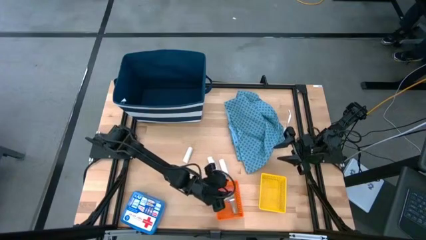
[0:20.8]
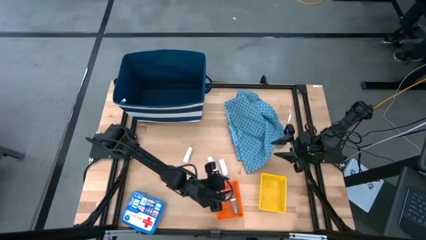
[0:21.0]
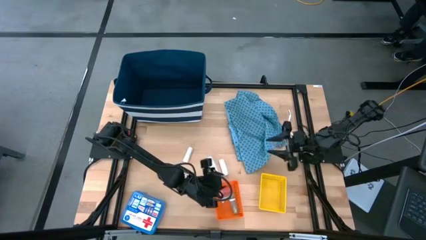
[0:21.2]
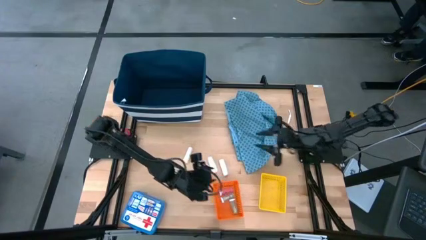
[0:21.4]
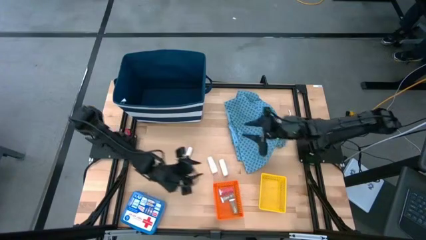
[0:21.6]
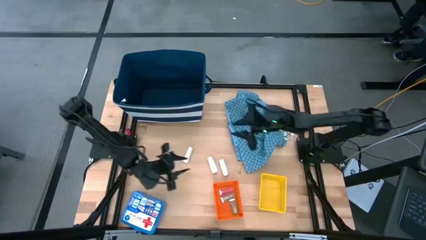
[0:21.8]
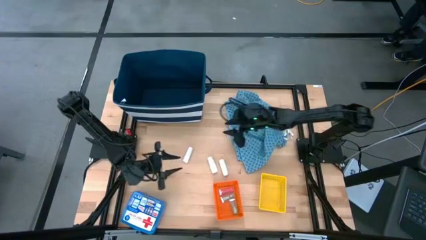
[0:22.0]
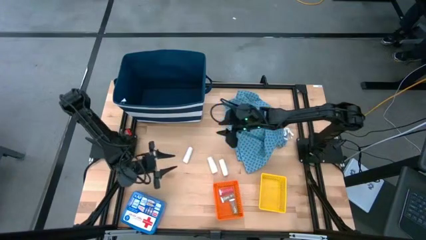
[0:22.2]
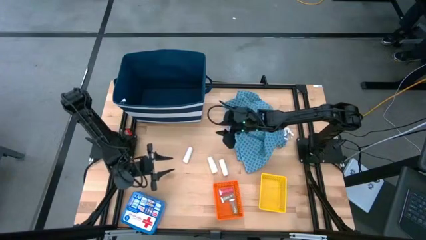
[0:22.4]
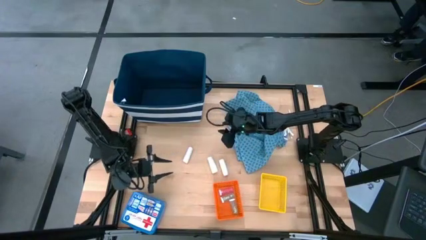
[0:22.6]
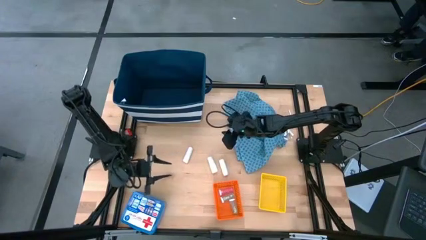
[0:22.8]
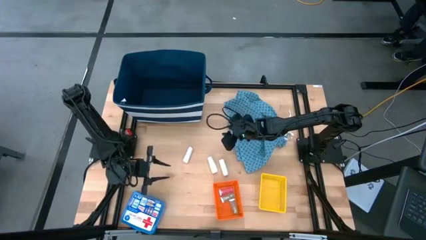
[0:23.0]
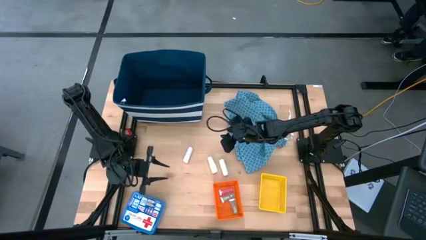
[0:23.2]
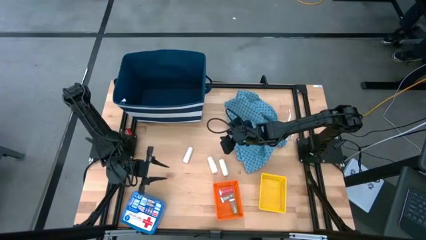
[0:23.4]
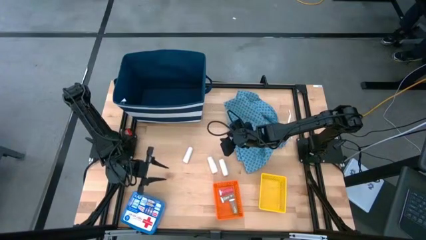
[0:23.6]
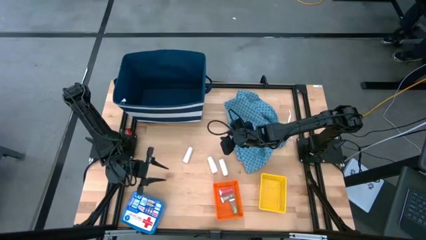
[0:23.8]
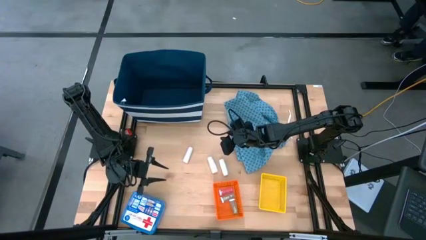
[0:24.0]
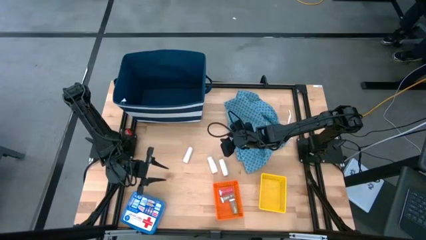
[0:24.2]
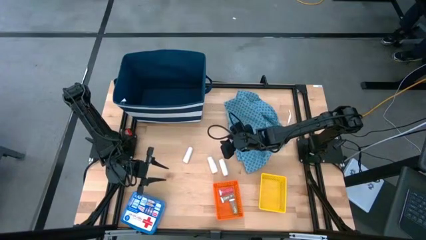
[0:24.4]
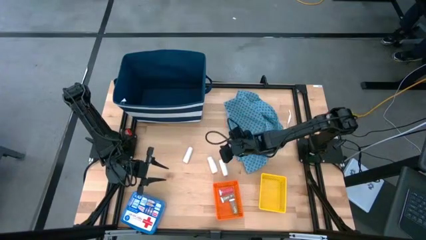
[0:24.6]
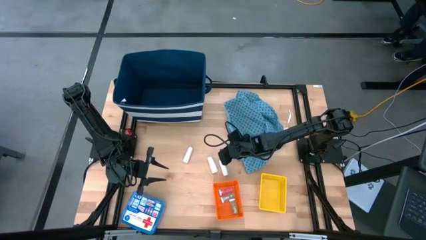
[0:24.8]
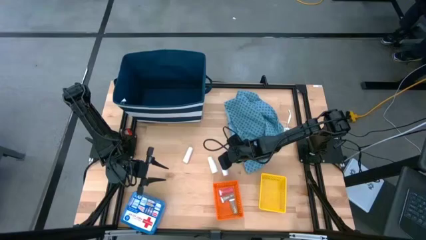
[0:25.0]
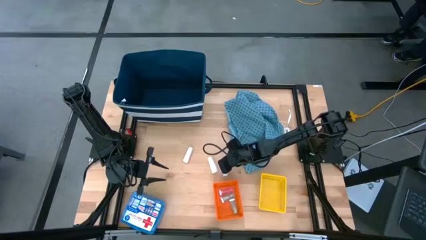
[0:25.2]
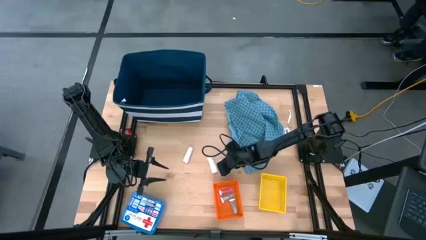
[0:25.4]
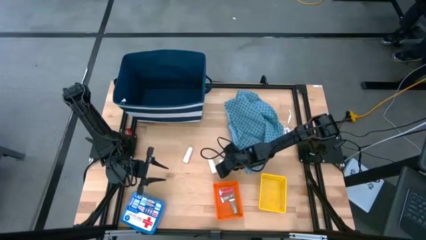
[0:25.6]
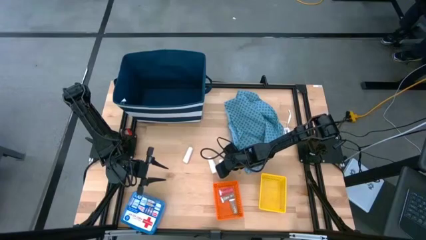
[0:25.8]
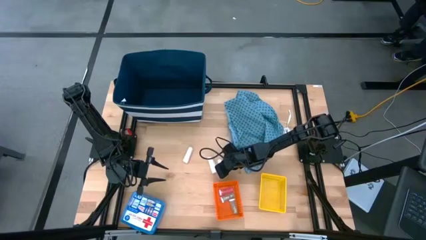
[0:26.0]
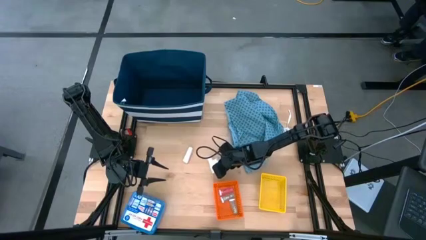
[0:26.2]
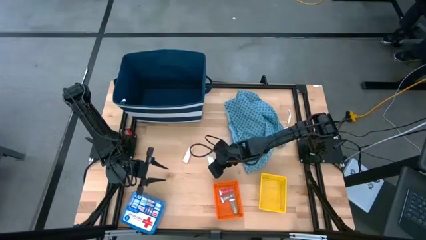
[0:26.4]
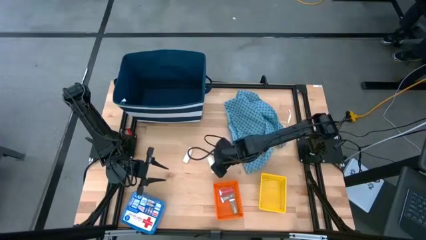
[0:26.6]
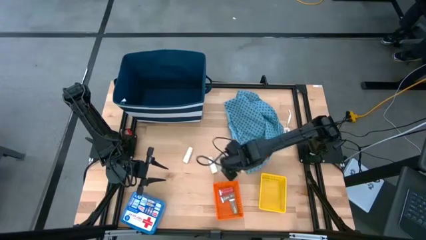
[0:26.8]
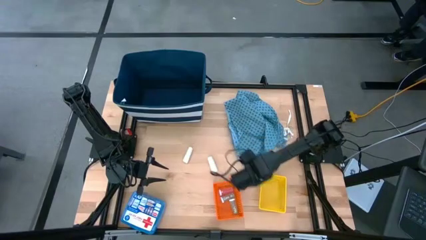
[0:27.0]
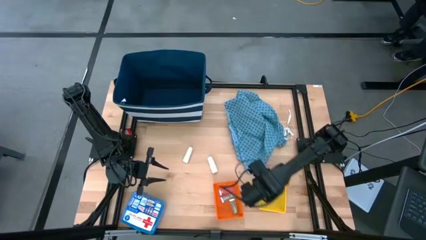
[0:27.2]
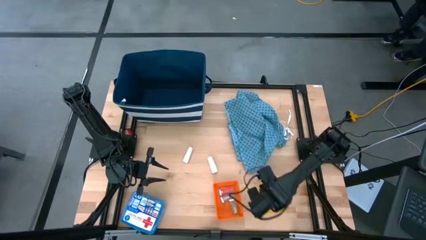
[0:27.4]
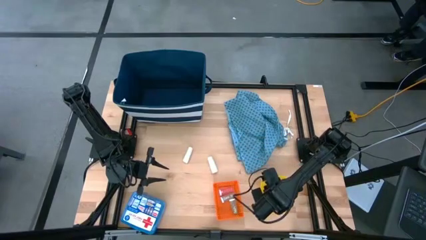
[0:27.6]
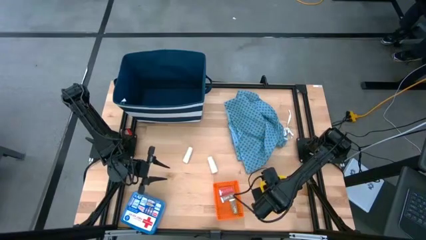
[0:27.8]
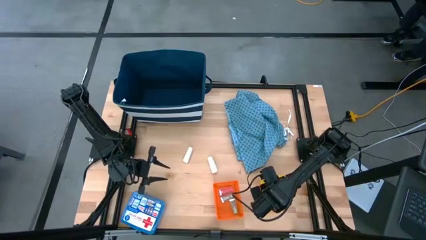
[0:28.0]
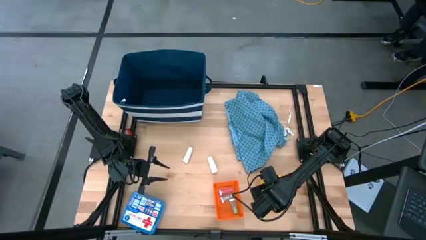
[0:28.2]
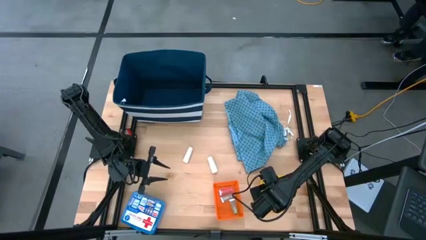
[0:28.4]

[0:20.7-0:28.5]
Task: Pick & Place Medicine items
Put the right rolled gauze into the yellow bin

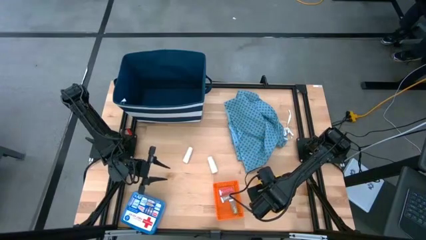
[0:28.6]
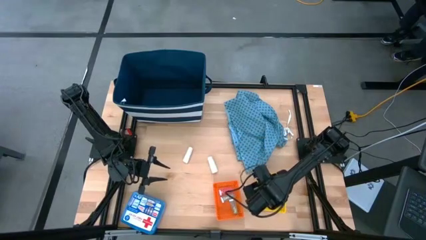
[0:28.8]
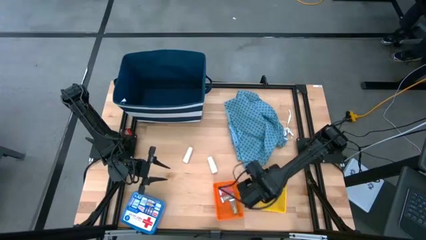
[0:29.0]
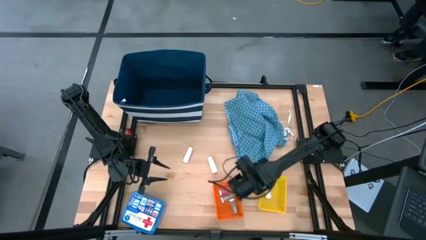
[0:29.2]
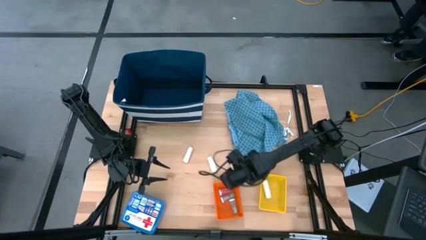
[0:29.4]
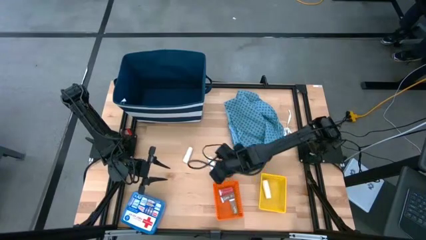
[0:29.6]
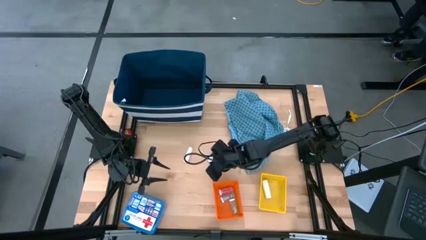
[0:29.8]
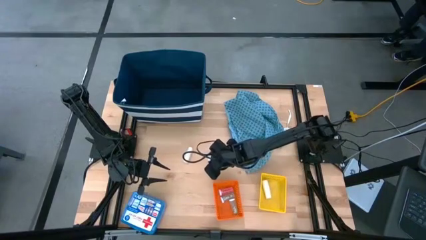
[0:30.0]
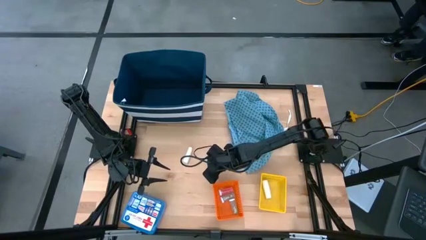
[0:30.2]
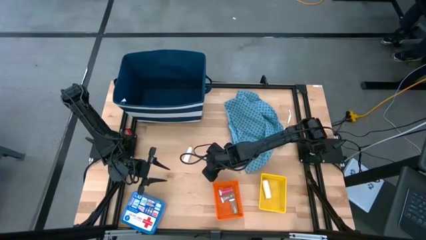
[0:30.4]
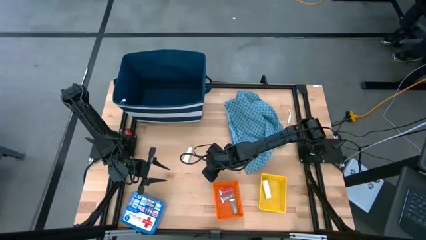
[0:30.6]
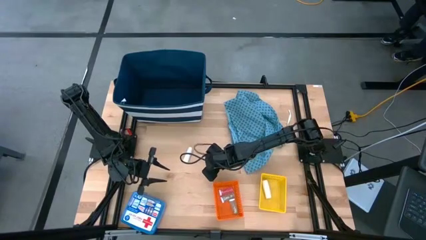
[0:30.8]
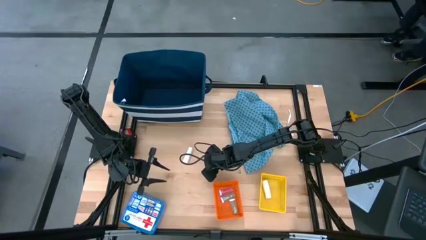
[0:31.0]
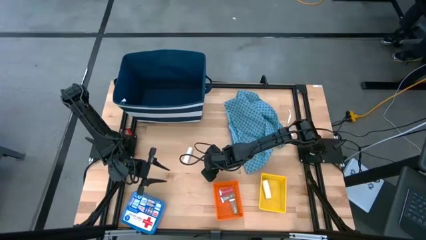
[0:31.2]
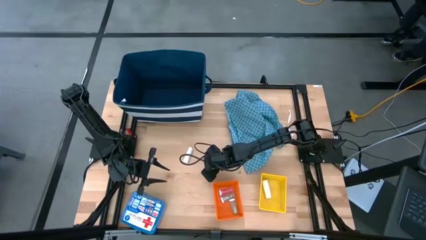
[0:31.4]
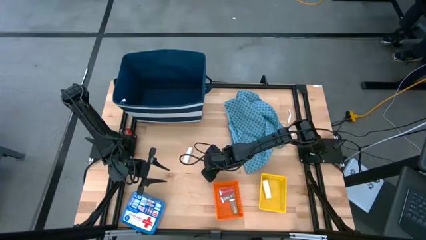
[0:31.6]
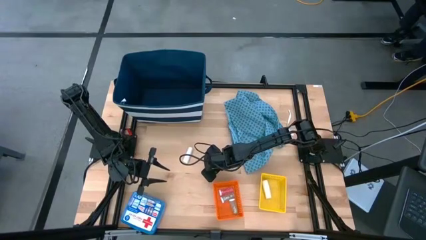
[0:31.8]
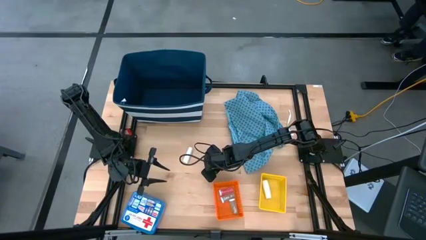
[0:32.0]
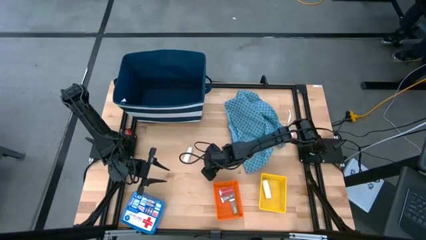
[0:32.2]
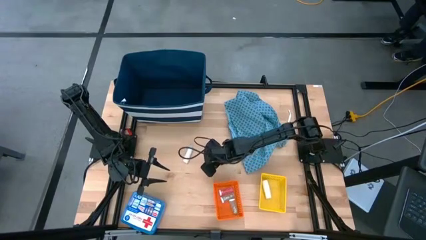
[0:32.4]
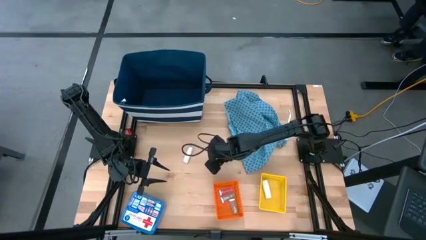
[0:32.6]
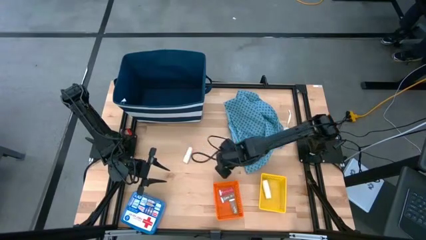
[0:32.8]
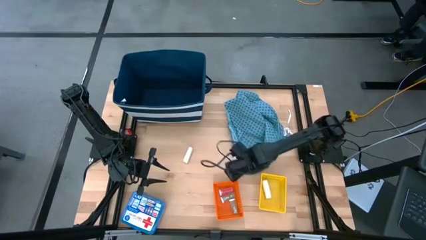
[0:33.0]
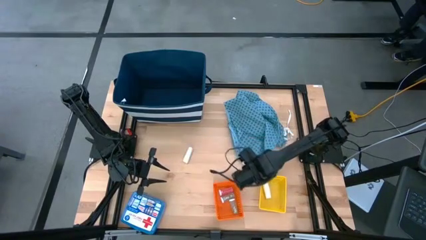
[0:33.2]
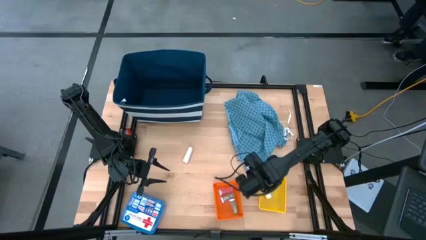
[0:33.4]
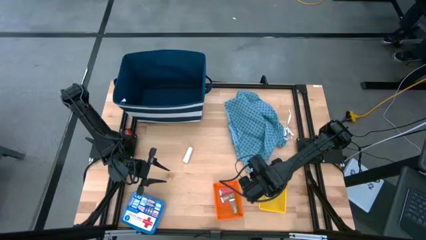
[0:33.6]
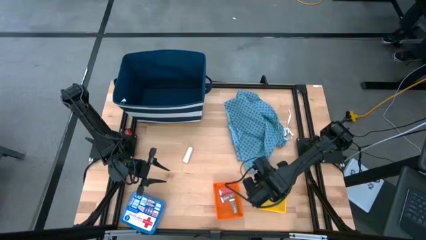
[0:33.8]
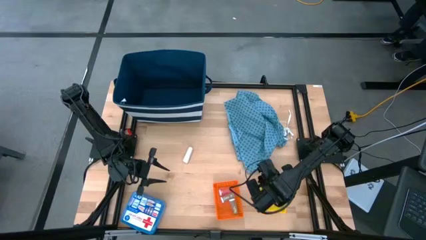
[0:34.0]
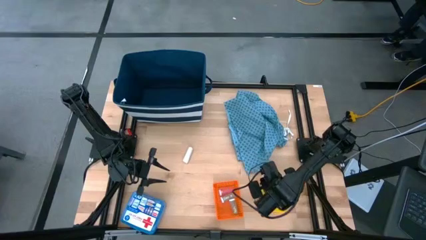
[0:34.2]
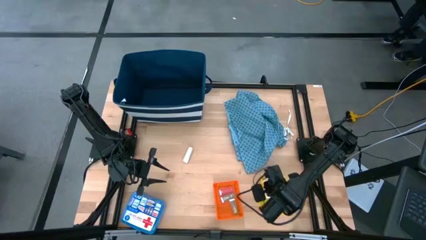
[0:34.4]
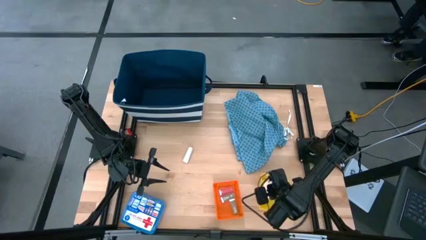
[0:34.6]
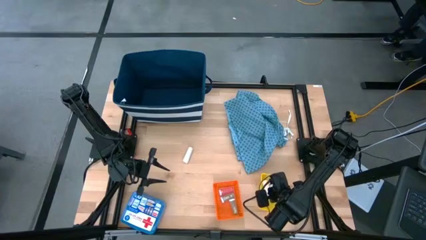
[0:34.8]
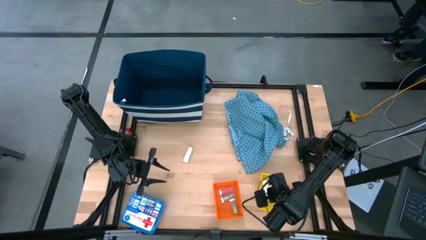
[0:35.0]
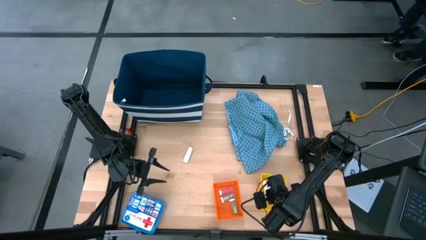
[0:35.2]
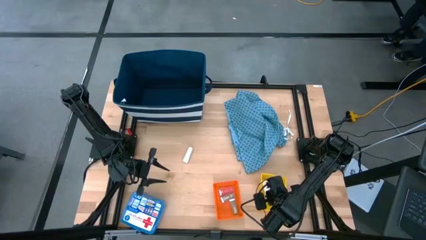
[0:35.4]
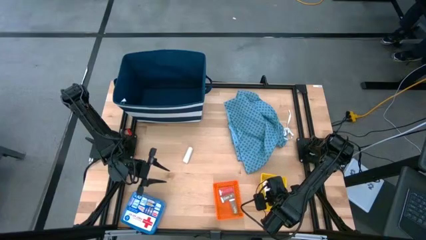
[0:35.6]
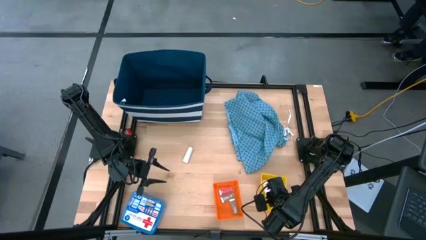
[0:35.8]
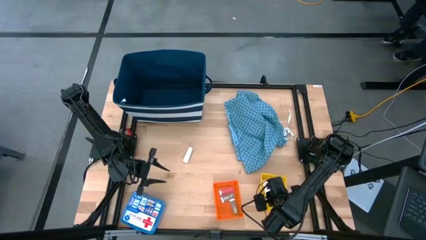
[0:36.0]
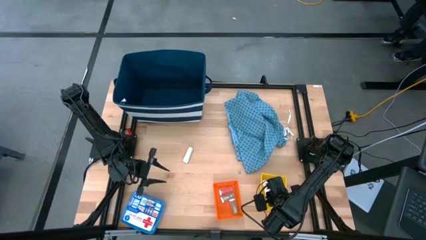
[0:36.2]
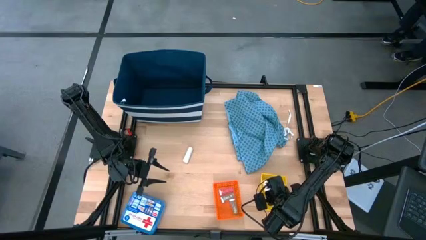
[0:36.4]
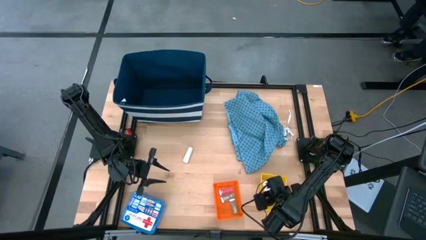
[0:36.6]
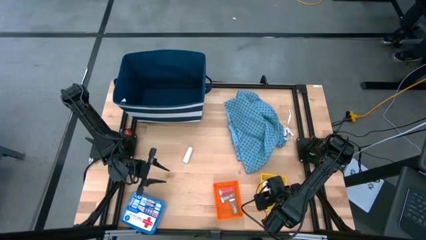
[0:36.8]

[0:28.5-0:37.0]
Put the right rolled gauze into the yellow bin
